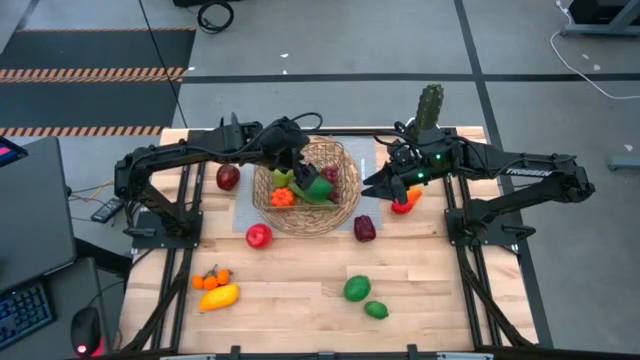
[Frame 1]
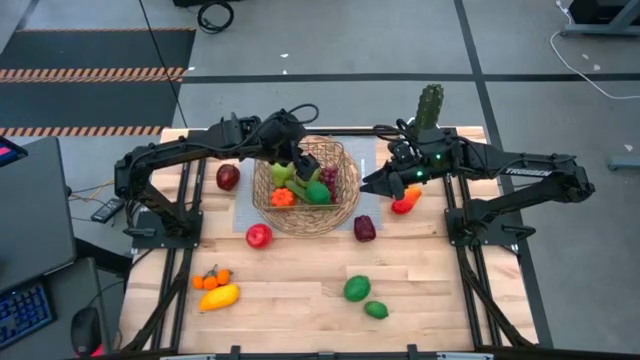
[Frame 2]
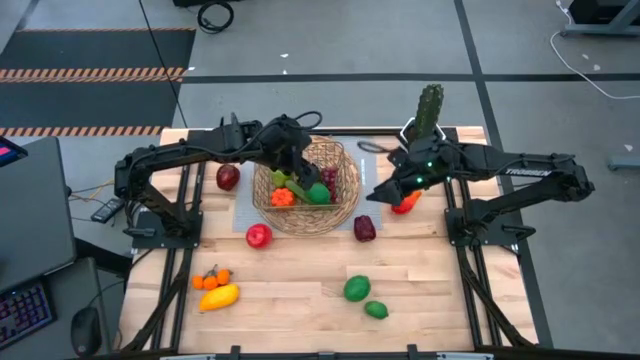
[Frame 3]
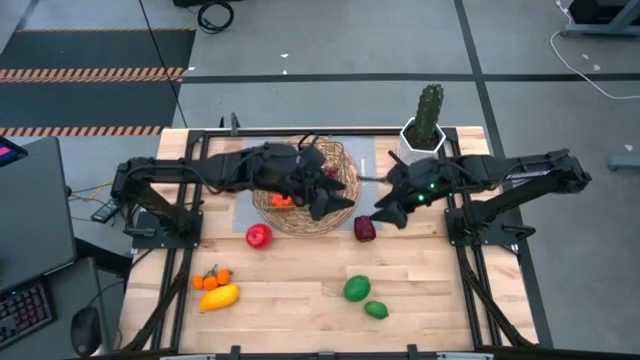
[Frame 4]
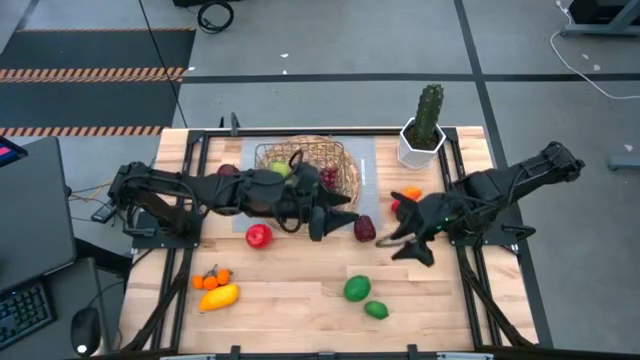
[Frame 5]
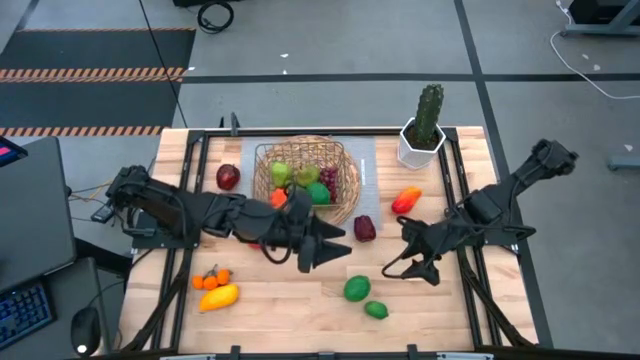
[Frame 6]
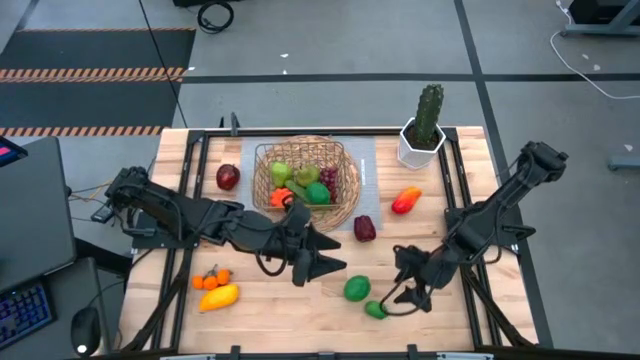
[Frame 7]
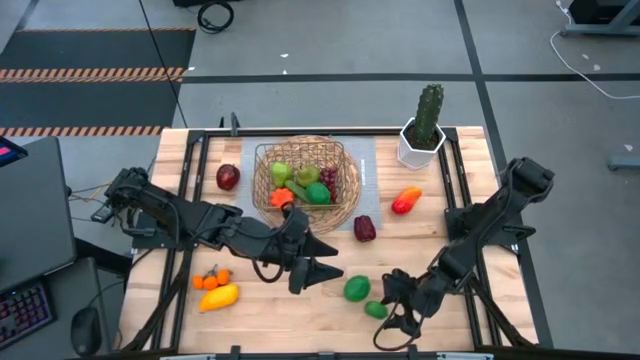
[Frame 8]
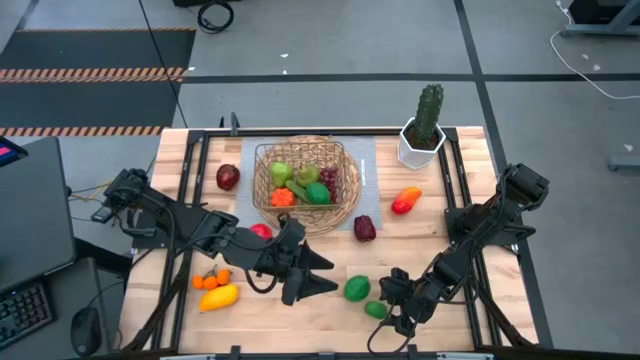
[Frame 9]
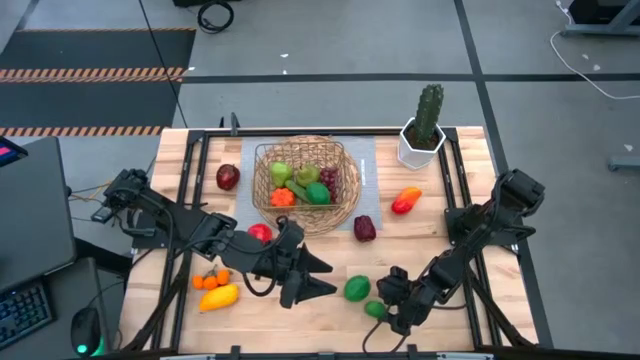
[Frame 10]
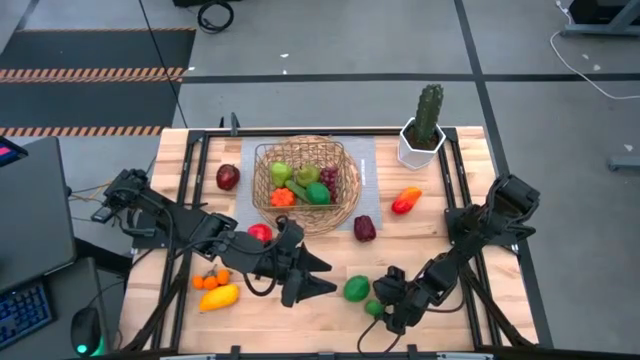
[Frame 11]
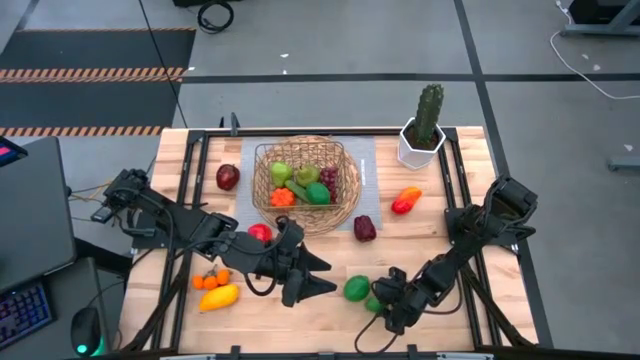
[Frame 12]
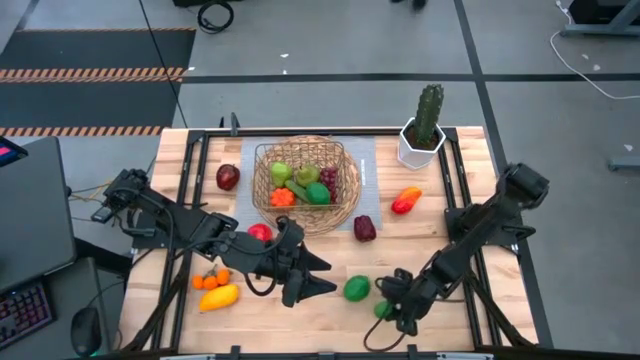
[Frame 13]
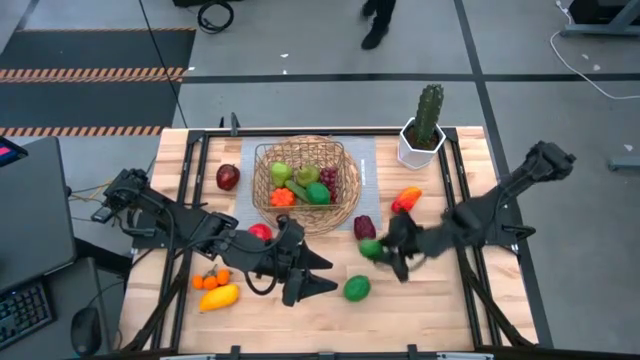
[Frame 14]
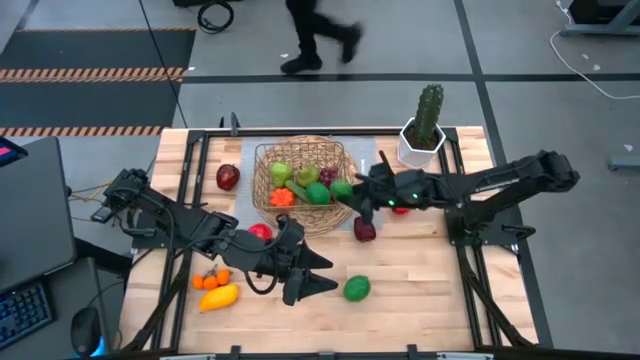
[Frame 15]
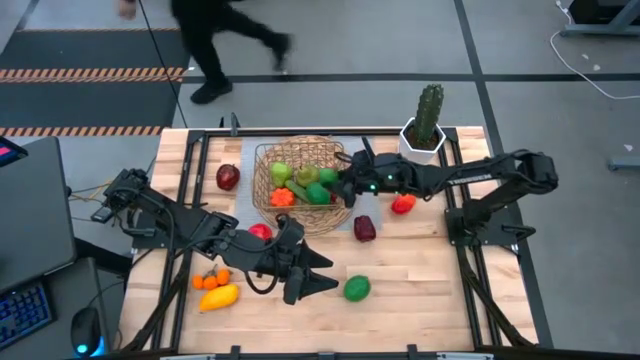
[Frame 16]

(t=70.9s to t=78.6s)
Task: Build produce basket
Put the right lime into the gold wire basket

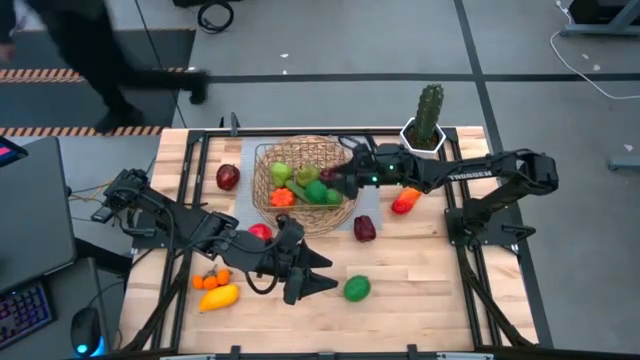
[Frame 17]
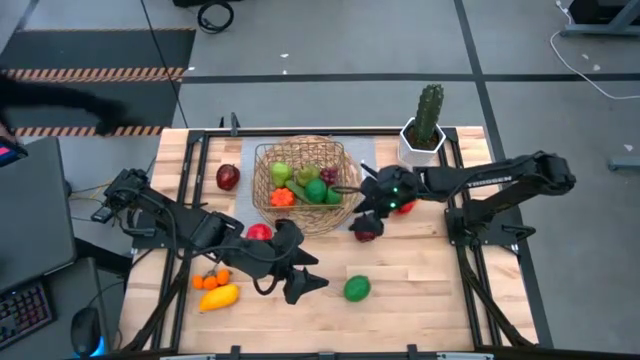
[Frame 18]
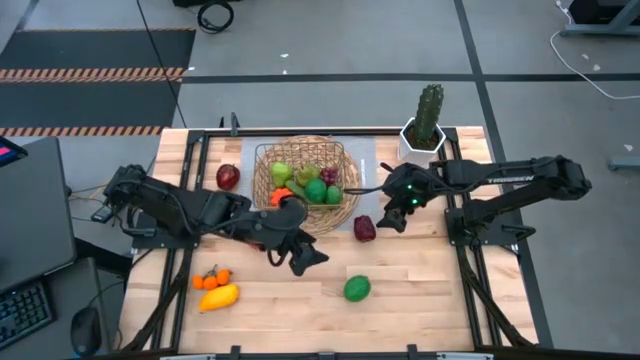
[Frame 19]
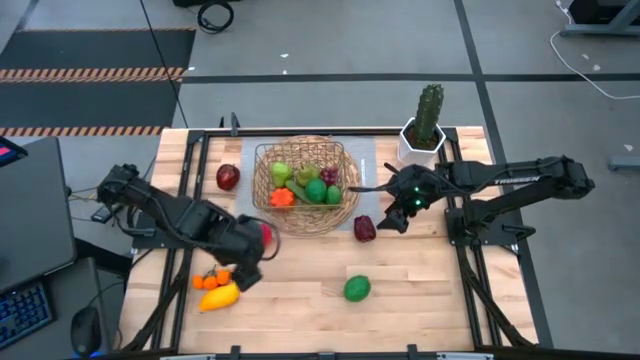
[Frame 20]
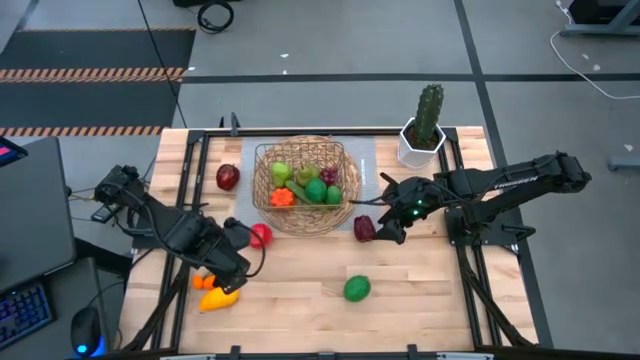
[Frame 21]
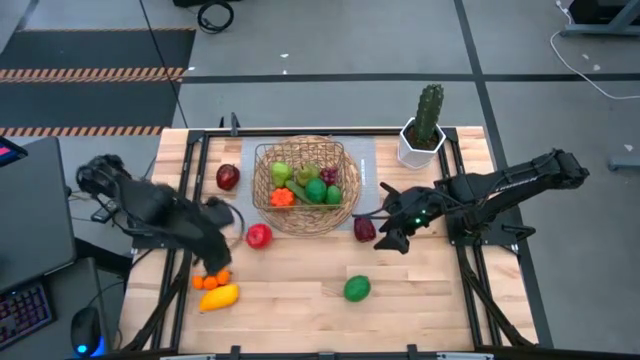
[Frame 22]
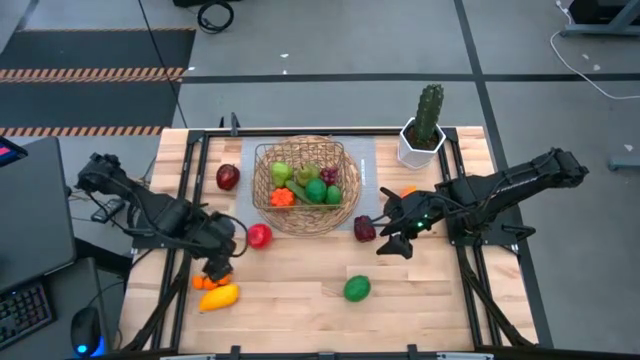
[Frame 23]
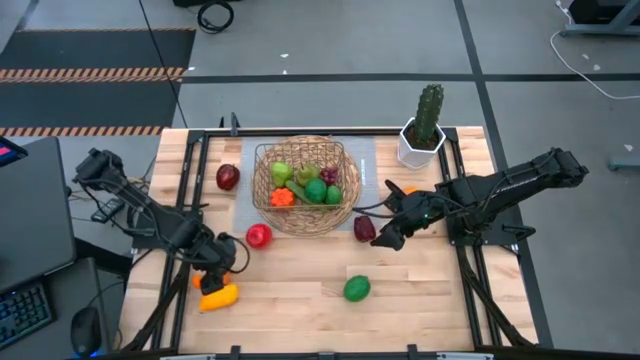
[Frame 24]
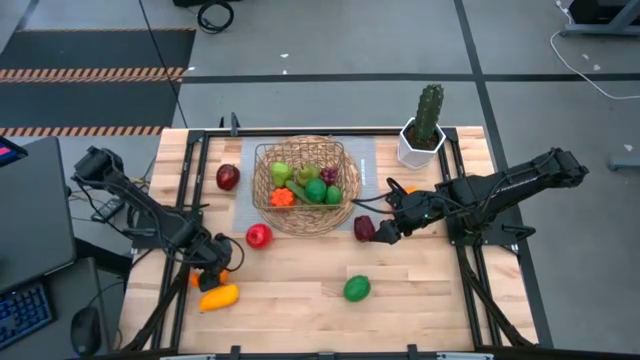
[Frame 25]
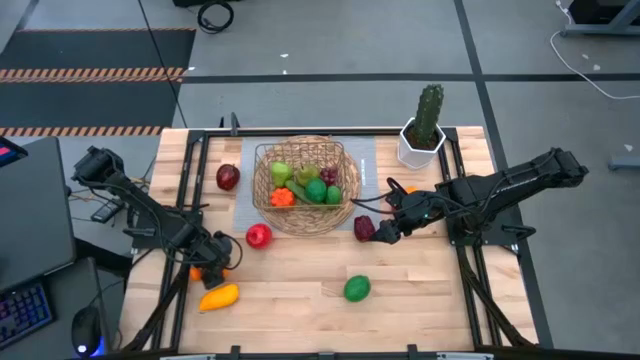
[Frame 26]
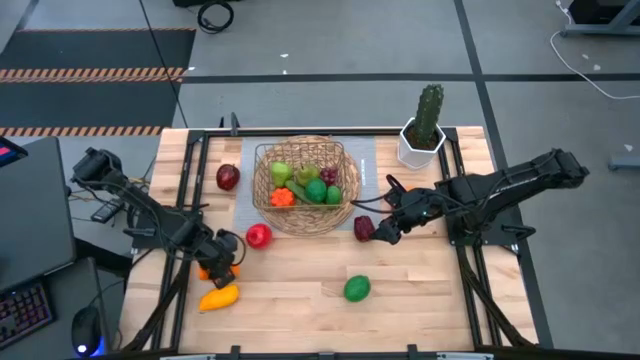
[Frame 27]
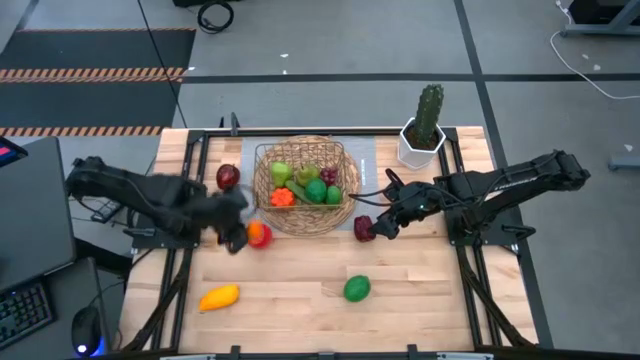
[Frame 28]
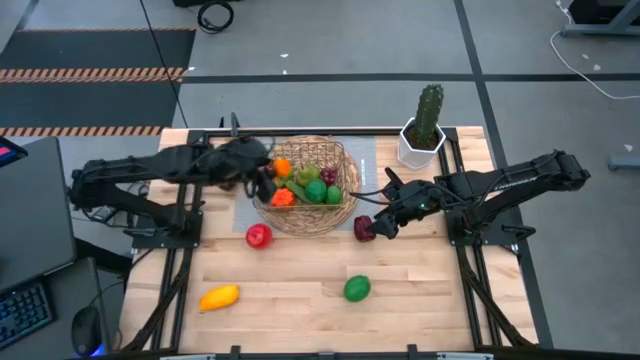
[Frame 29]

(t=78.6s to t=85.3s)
Put the tangerine into the gold wire basket

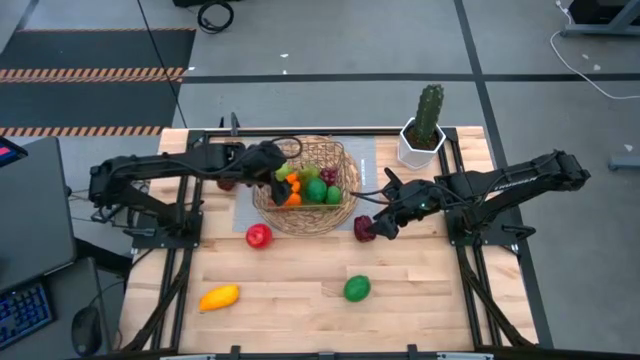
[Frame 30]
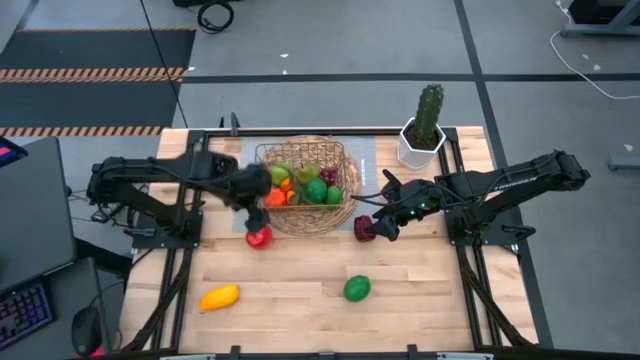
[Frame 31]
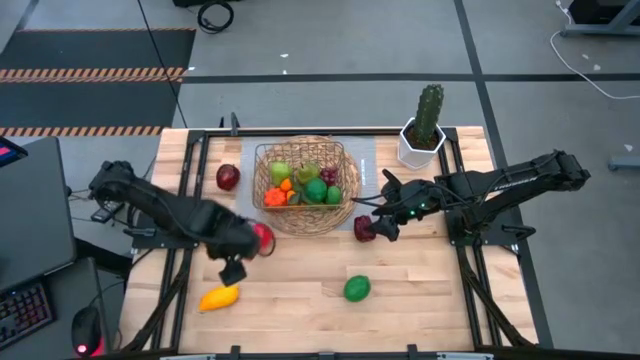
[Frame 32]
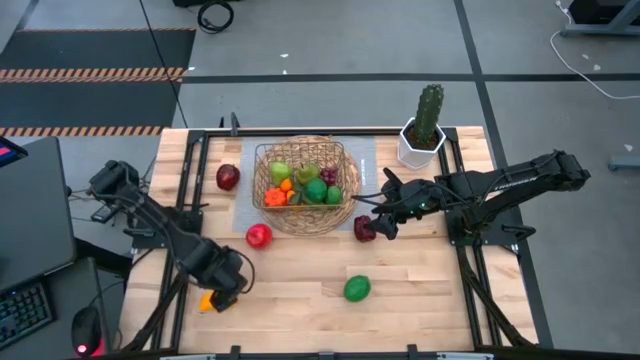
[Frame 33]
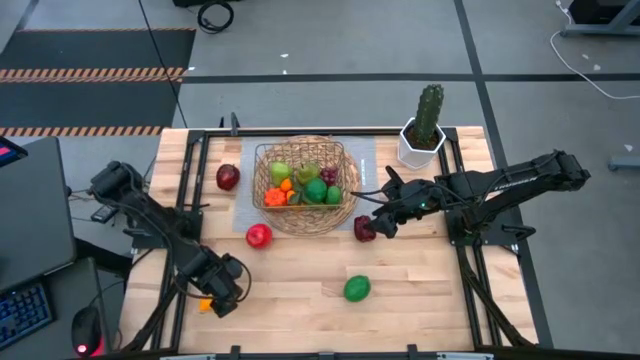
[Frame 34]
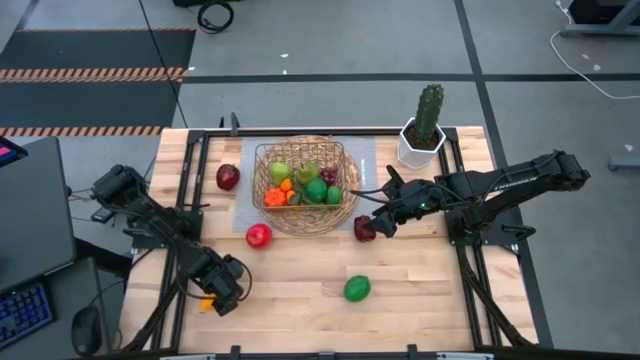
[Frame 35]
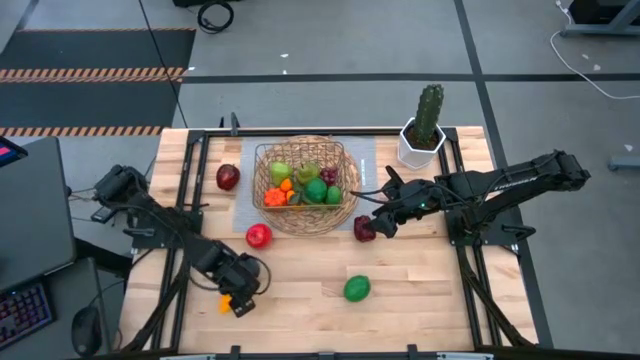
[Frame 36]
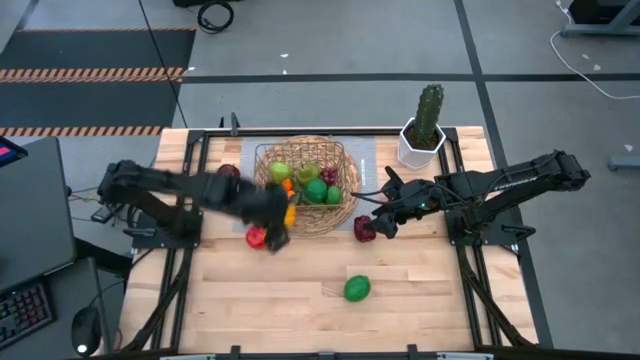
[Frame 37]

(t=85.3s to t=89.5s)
Put the yellow mango into the gold wire basket

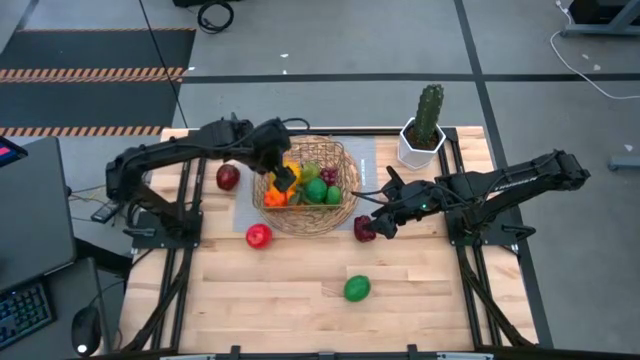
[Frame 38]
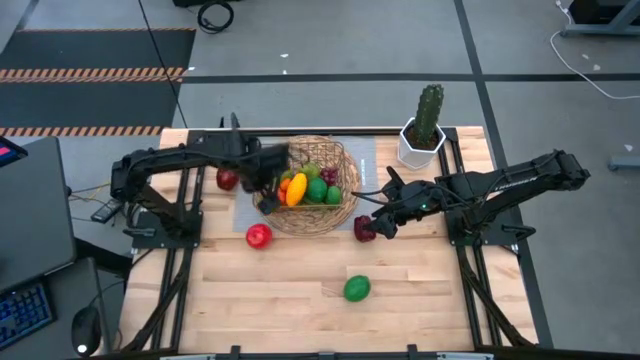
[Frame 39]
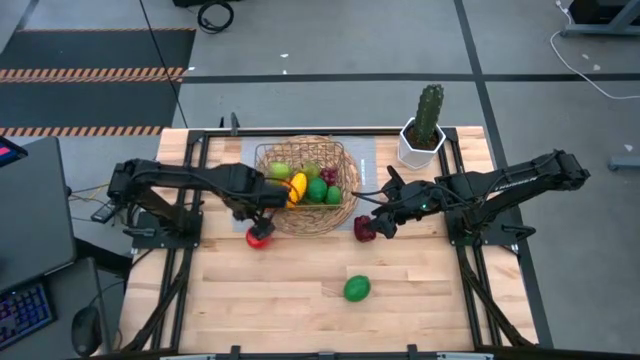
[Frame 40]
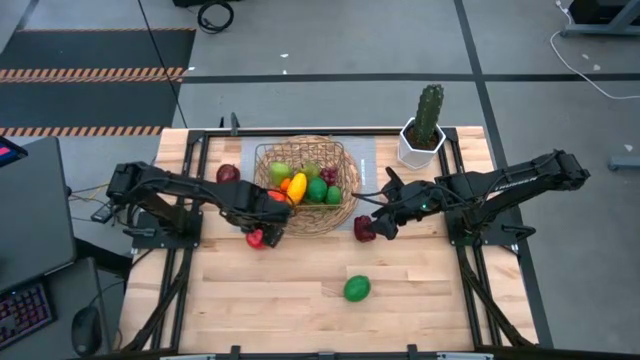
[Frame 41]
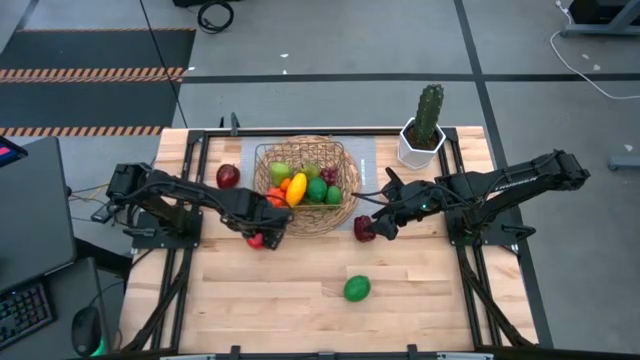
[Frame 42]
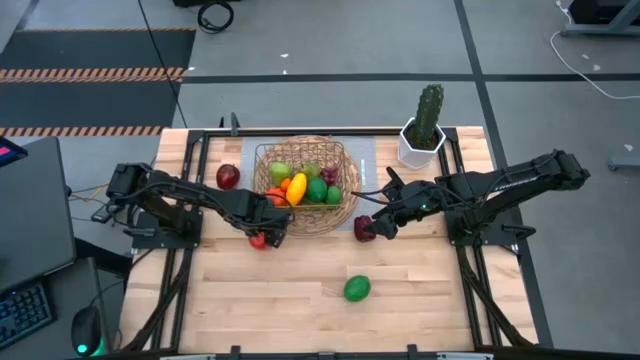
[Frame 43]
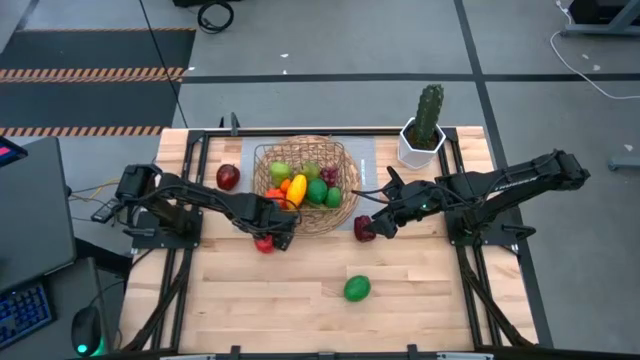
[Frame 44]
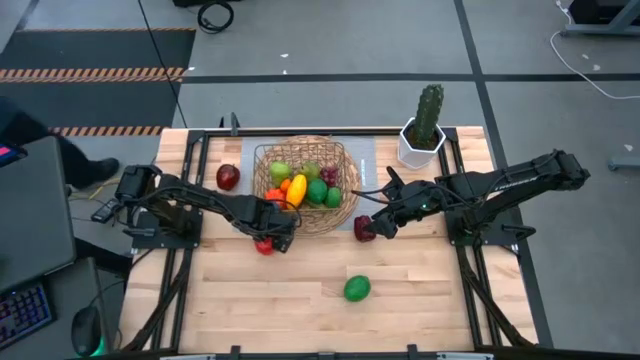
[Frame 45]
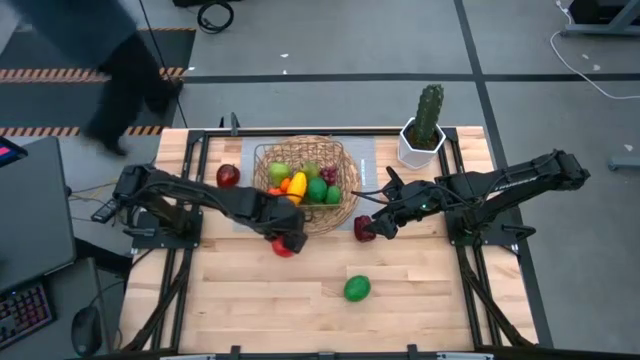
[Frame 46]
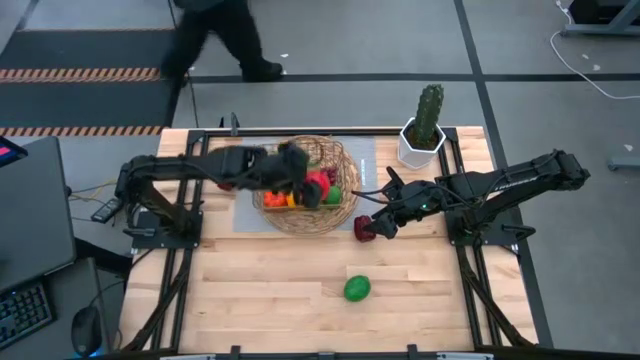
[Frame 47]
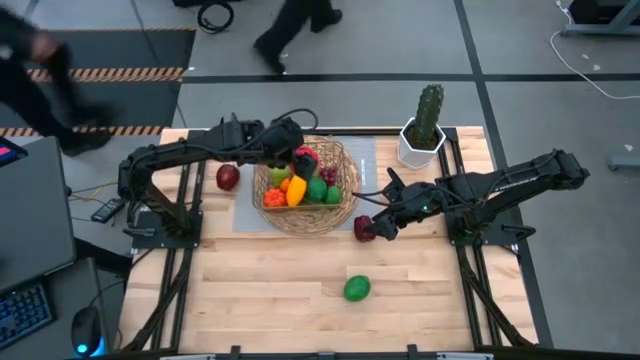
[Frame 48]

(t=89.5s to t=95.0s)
Put the apple into the gold wire basket
